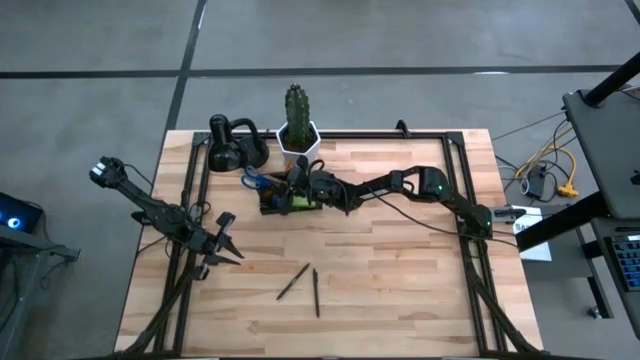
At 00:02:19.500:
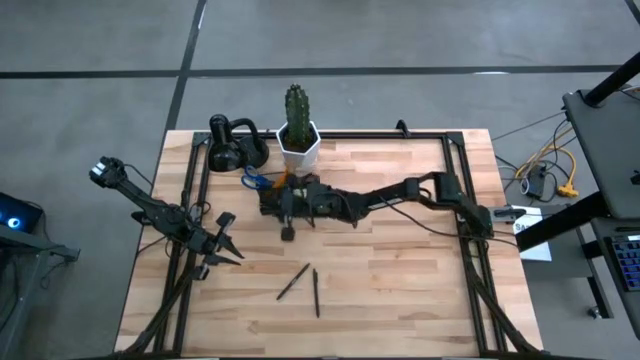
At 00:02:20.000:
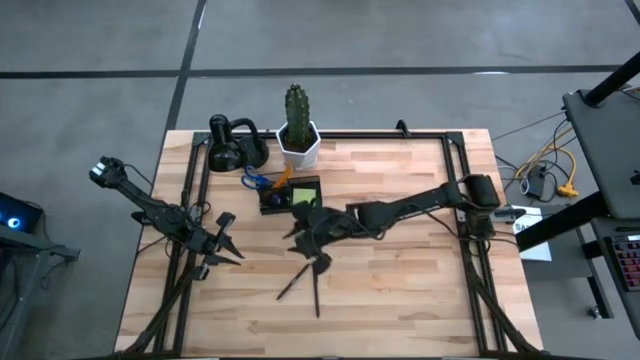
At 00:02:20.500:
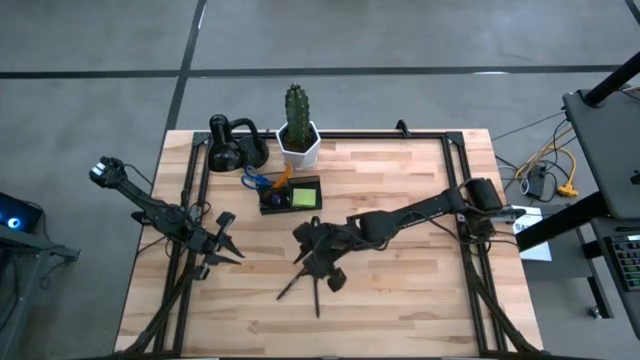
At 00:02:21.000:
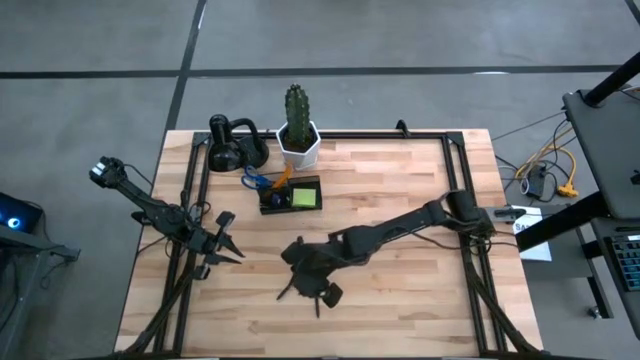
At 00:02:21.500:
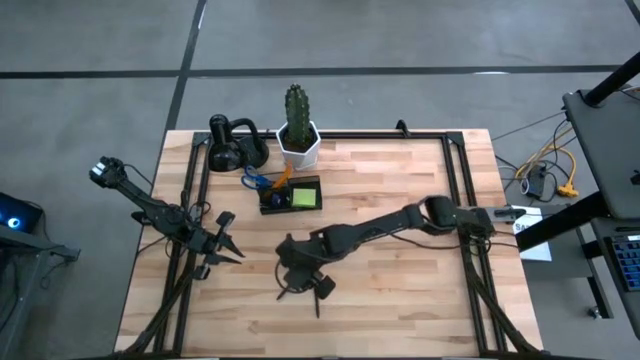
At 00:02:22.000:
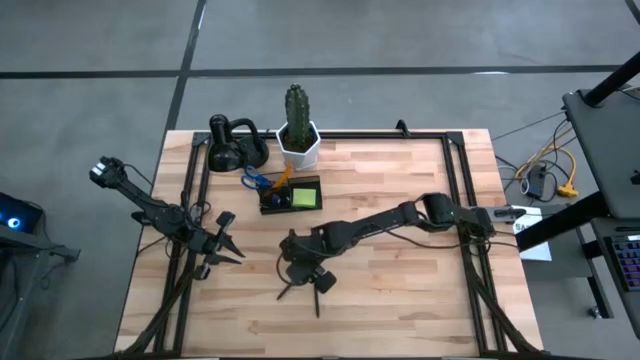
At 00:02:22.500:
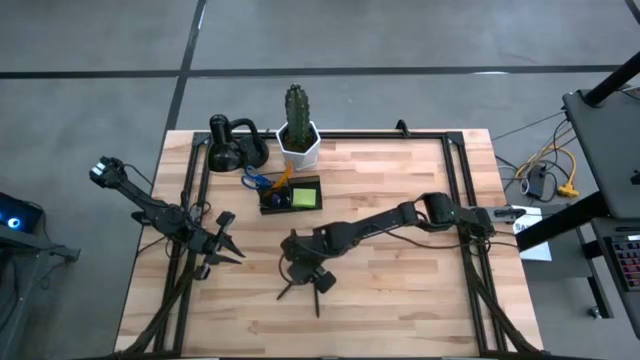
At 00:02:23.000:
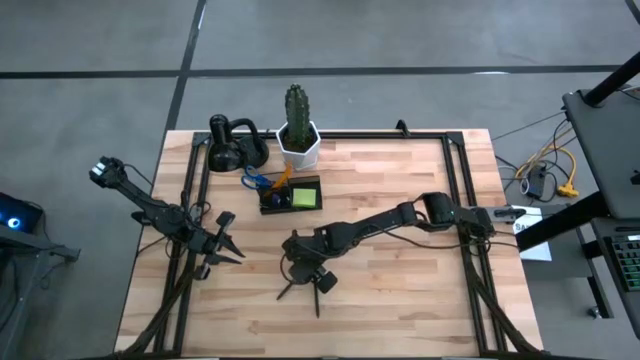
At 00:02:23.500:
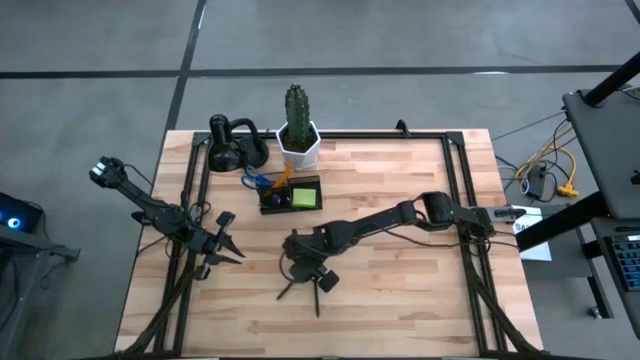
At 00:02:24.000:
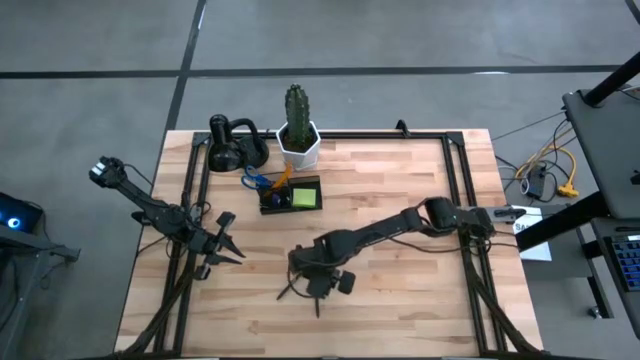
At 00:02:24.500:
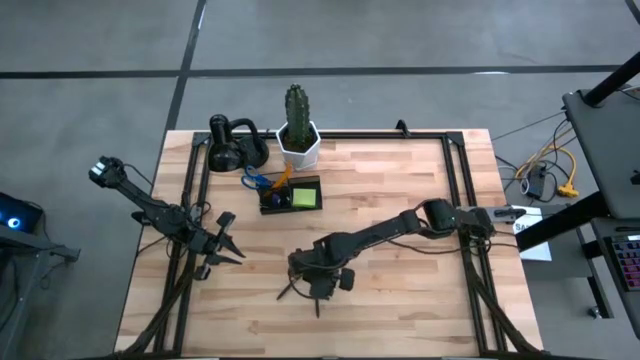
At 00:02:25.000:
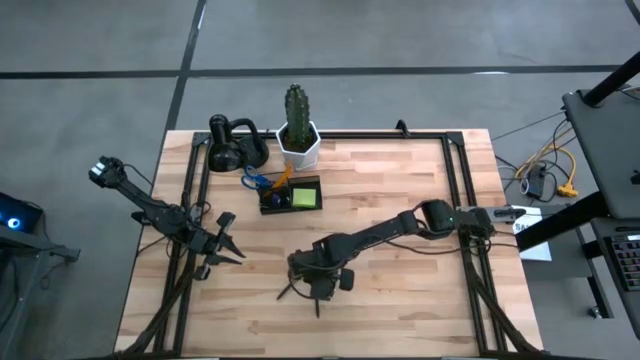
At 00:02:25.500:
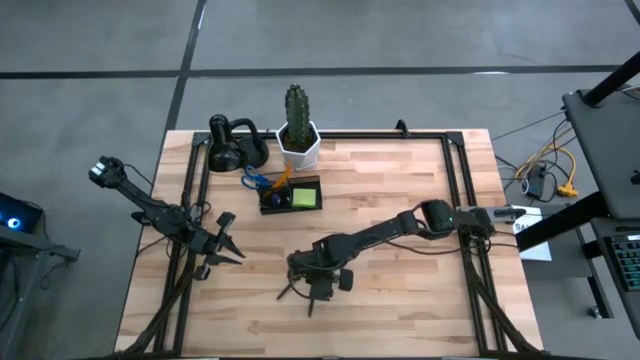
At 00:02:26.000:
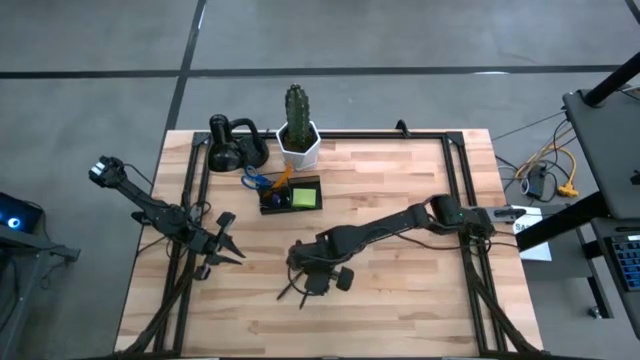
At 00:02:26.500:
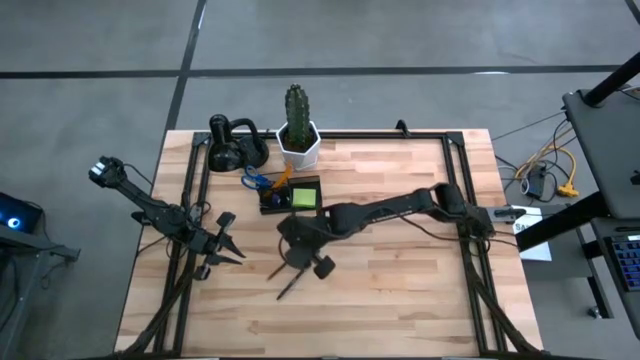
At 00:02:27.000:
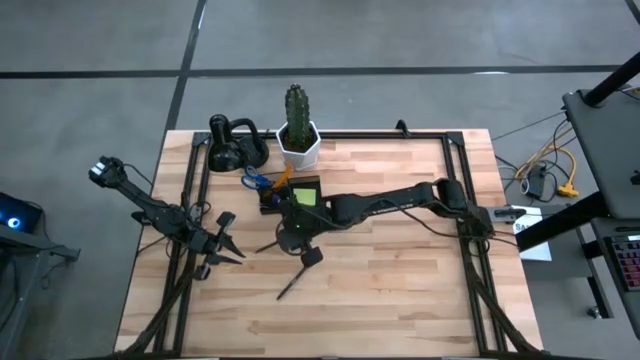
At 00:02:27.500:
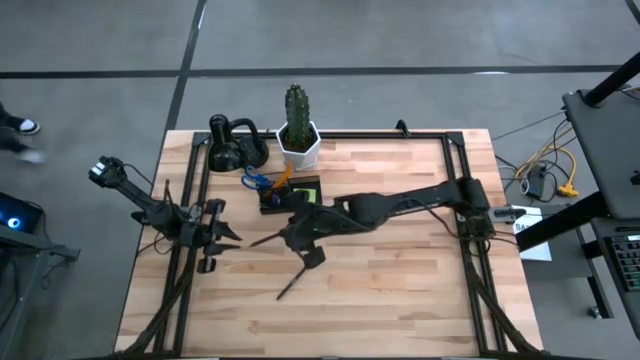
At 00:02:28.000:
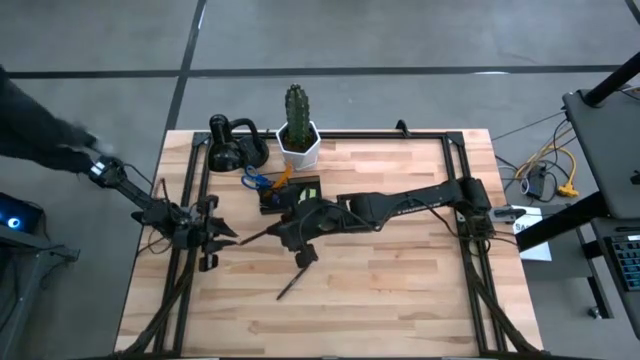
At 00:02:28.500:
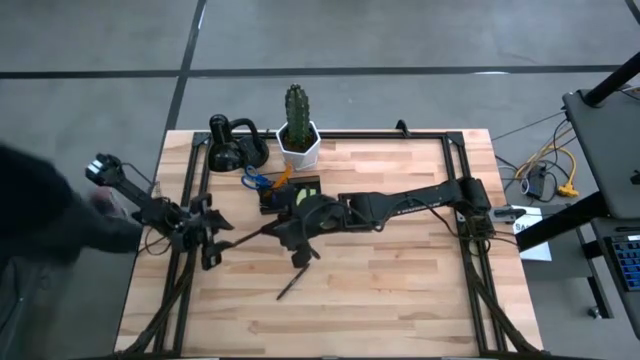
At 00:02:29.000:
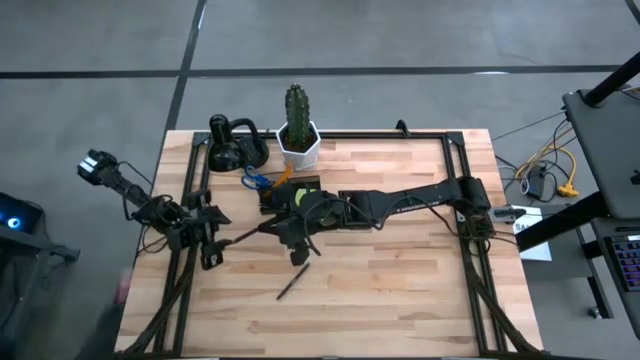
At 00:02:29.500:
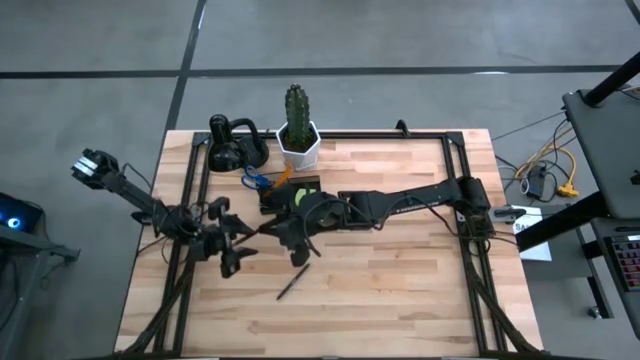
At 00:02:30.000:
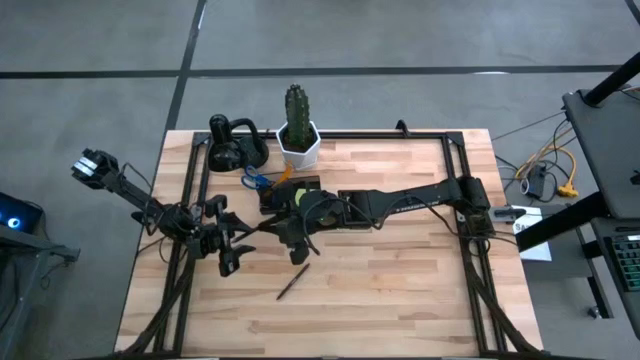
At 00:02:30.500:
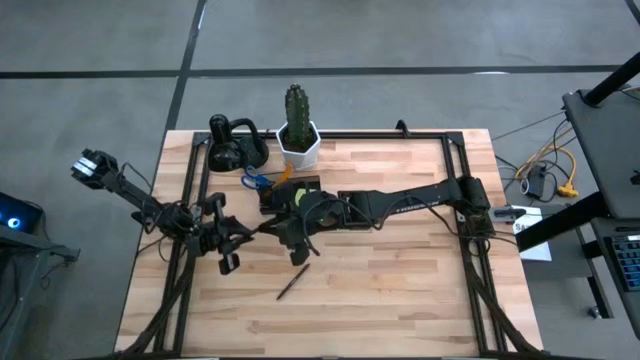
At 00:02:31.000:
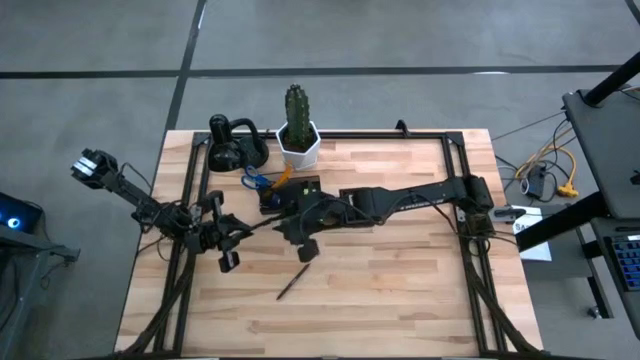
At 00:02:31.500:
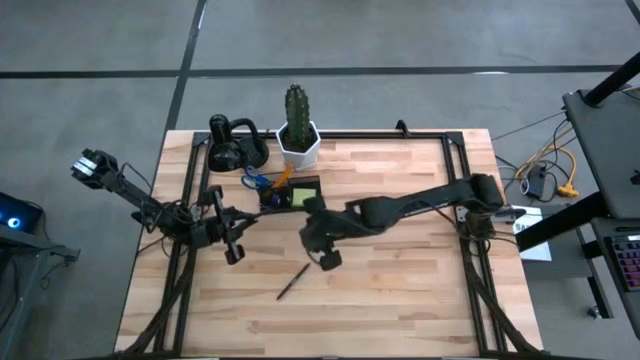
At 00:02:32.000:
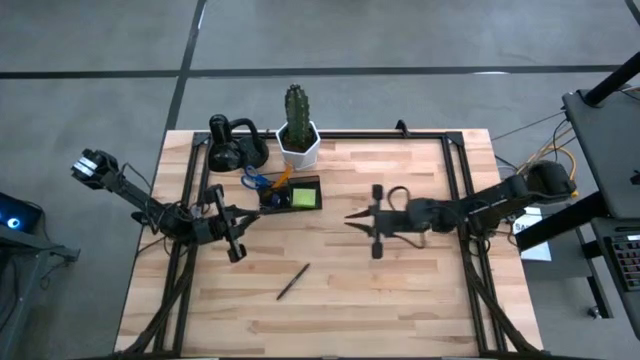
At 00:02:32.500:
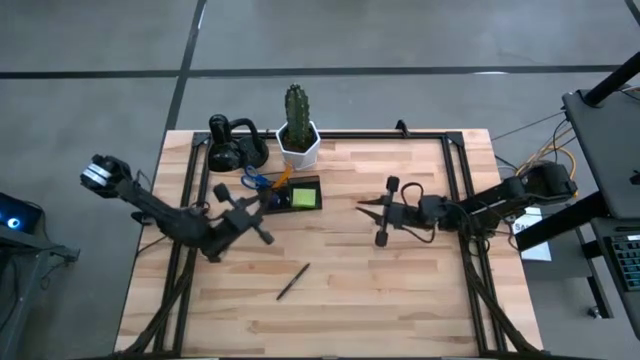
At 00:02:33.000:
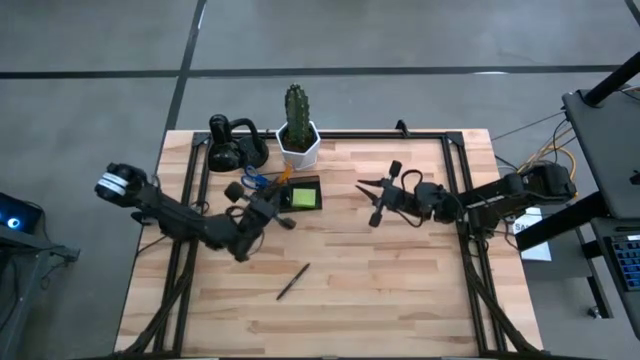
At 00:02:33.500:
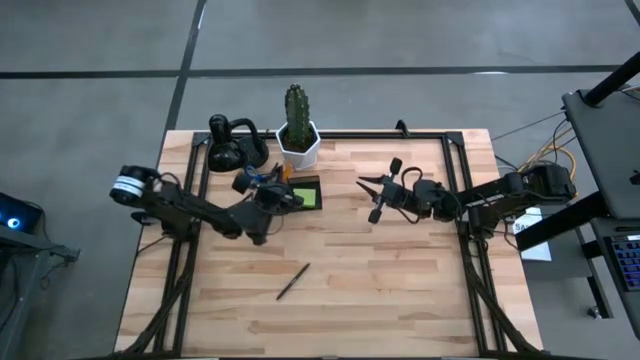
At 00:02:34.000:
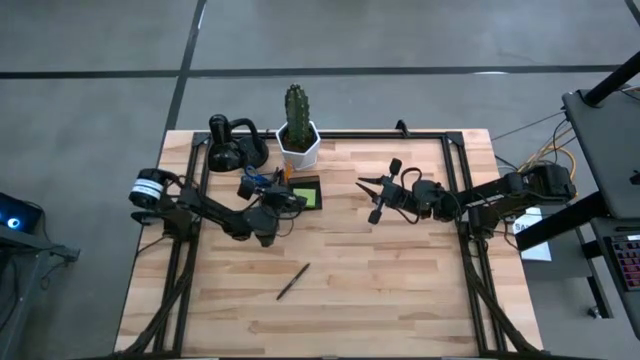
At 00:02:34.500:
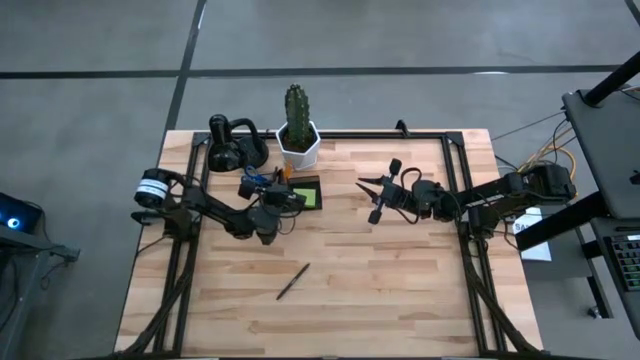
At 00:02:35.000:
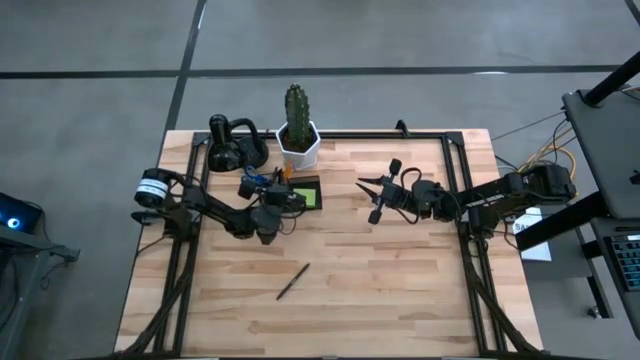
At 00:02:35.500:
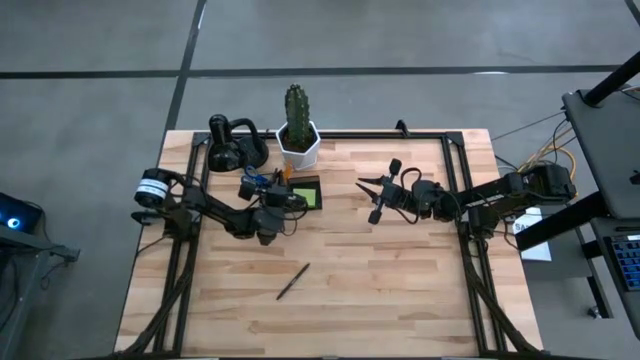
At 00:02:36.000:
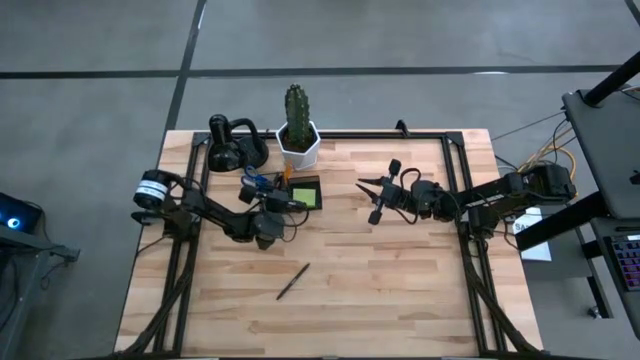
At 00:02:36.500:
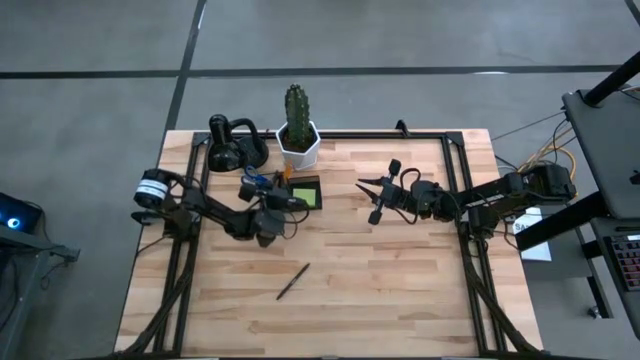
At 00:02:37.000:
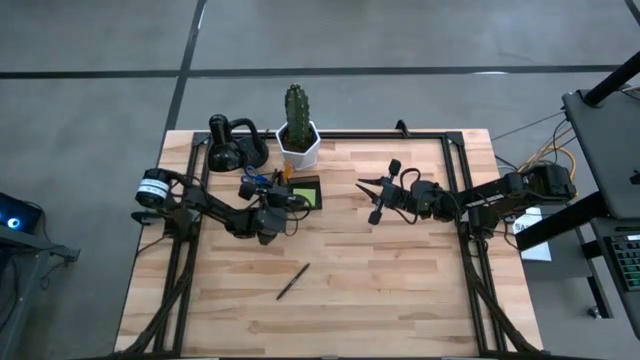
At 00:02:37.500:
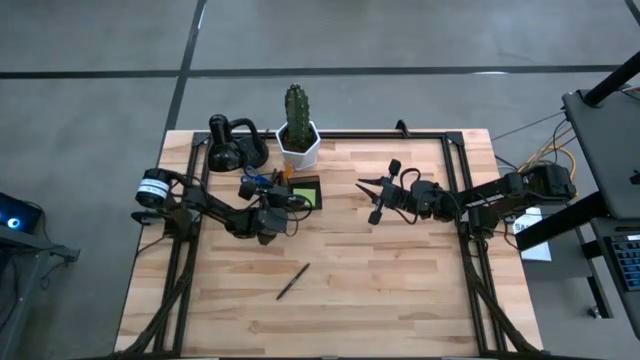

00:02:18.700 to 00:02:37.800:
Task: Pick and place office supplies into organizer
Put the right black pen into the black desk organizer
